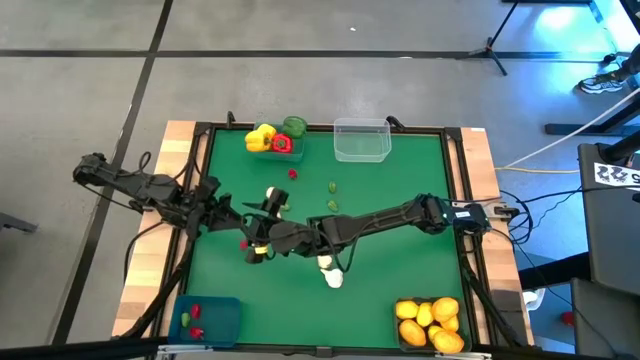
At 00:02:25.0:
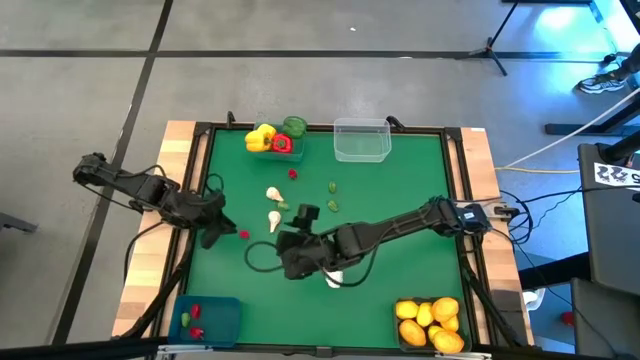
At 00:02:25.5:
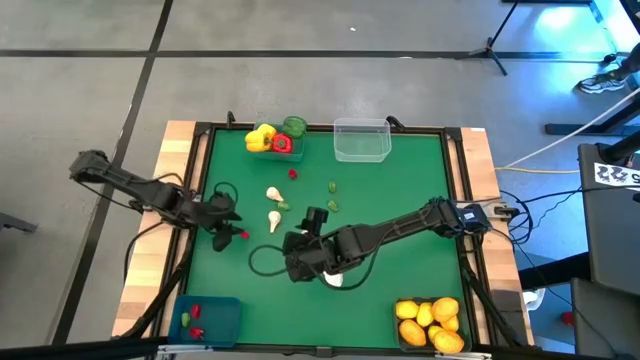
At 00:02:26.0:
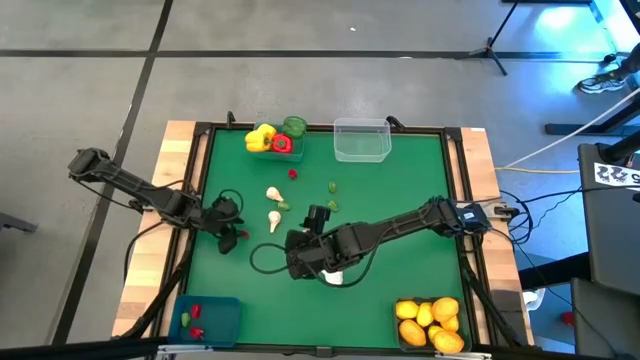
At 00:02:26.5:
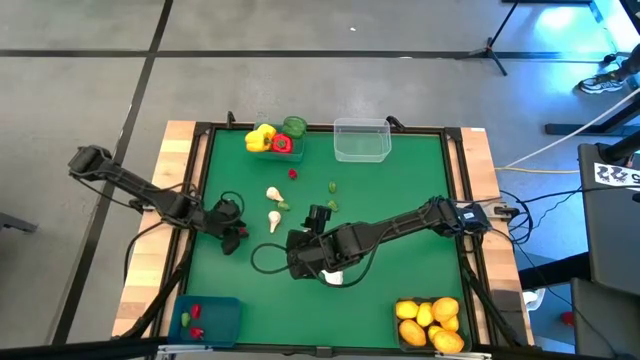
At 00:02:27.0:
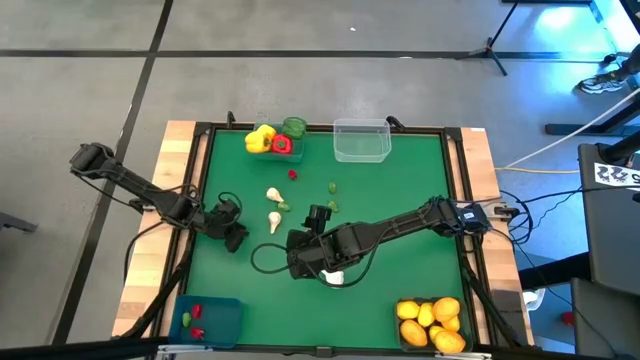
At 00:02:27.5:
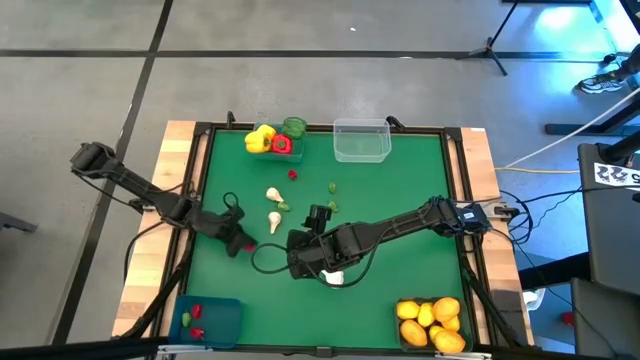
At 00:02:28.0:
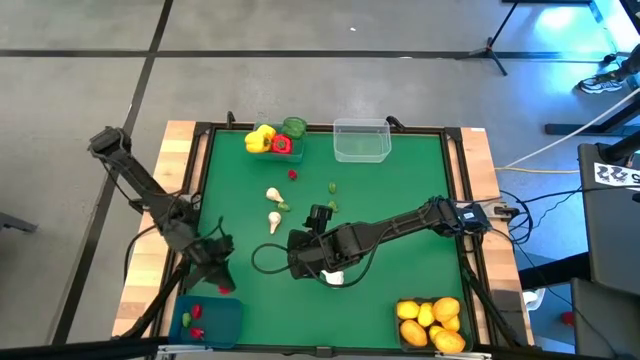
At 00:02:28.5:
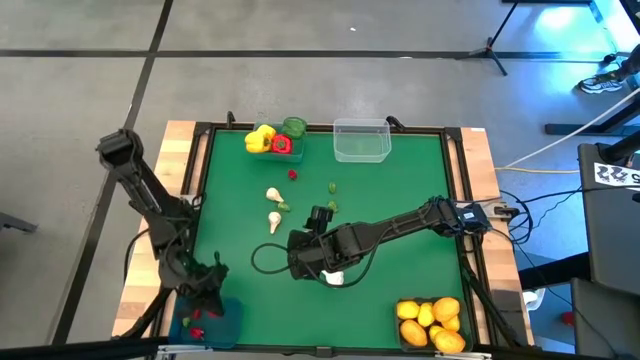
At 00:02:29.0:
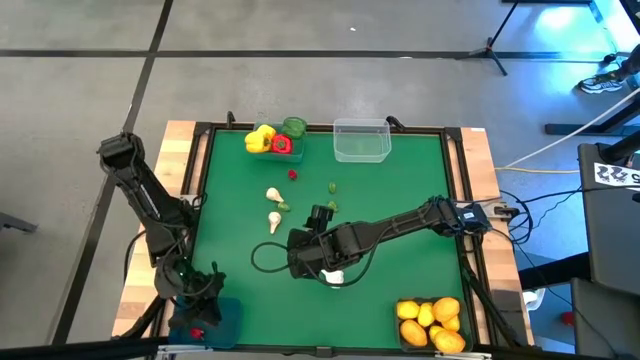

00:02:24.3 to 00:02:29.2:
Task: Sort produce into baskets
Put the red chili pepper into the blue bin

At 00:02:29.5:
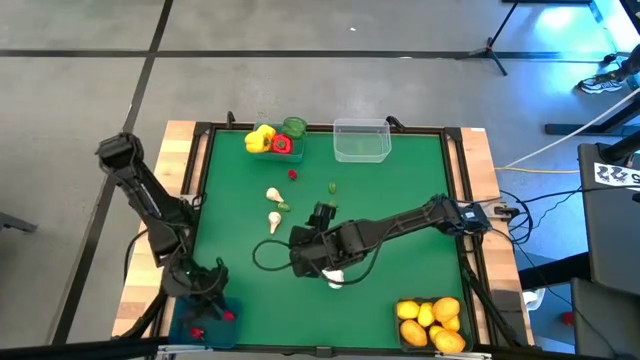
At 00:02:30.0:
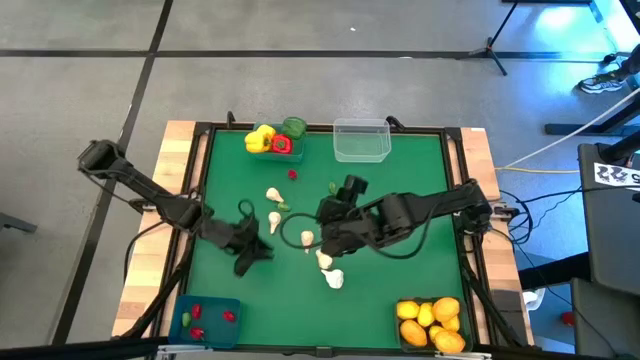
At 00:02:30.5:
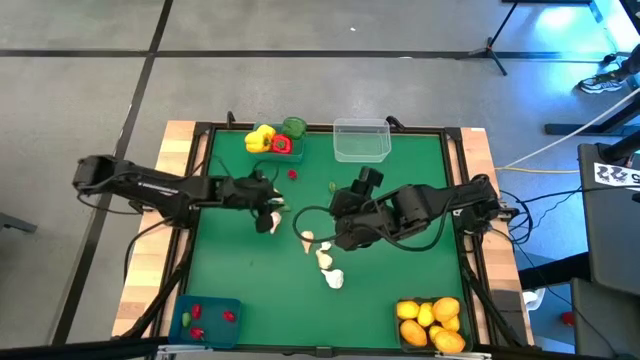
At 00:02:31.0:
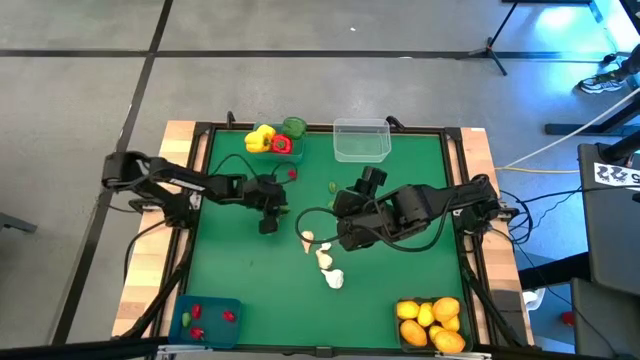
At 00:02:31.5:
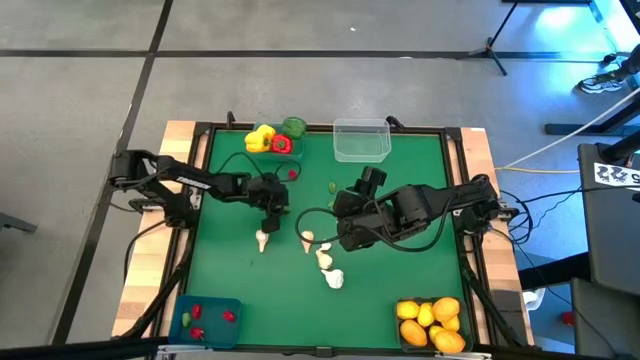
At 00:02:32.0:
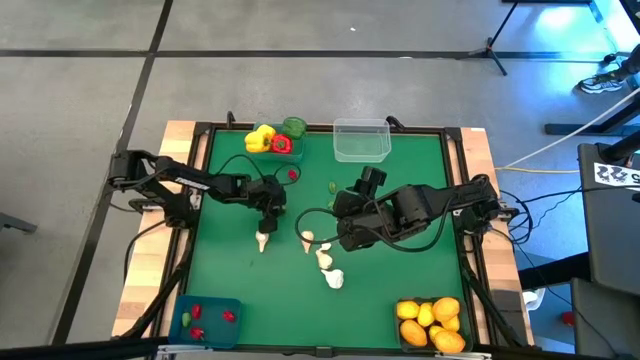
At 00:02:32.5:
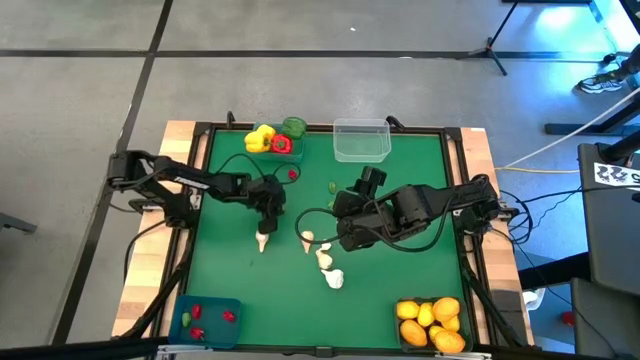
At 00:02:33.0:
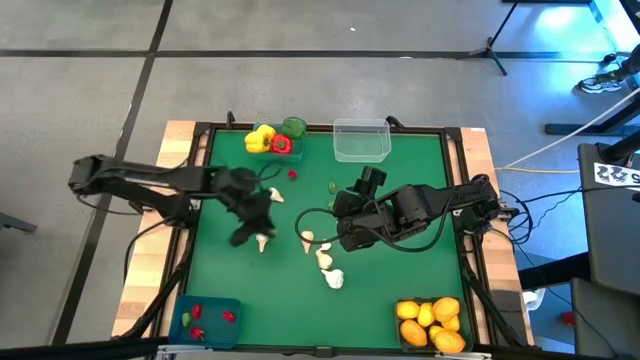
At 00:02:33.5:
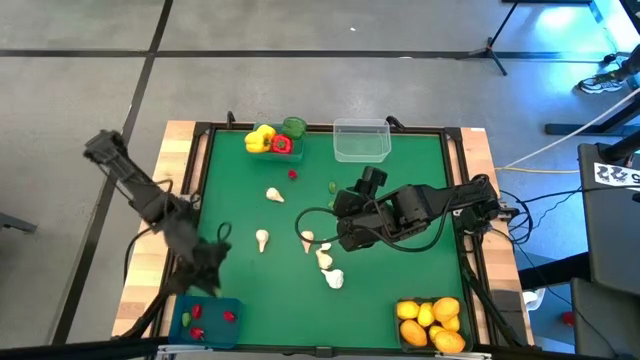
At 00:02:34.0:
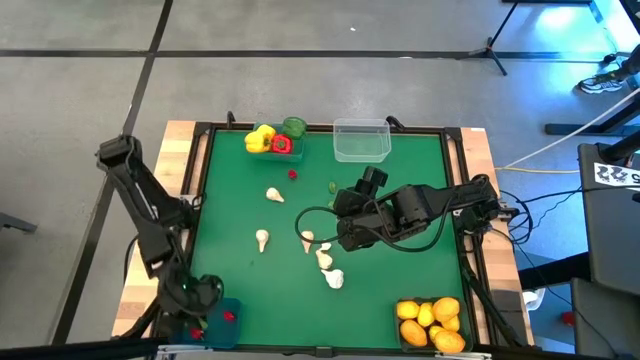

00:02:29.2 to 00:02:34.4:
Put the green chili pepper into the blue bin

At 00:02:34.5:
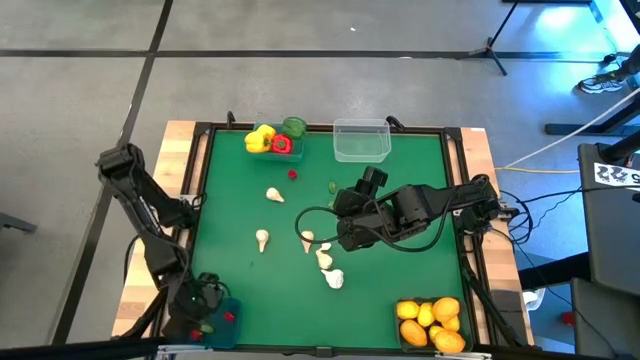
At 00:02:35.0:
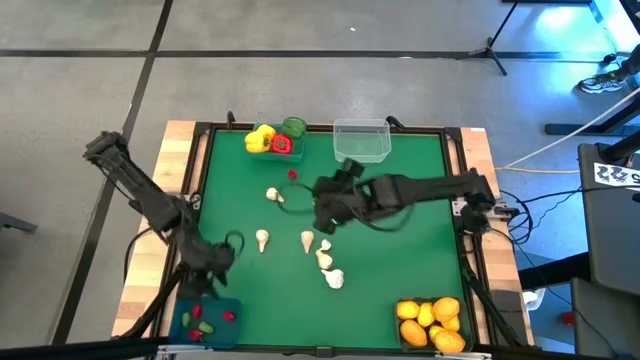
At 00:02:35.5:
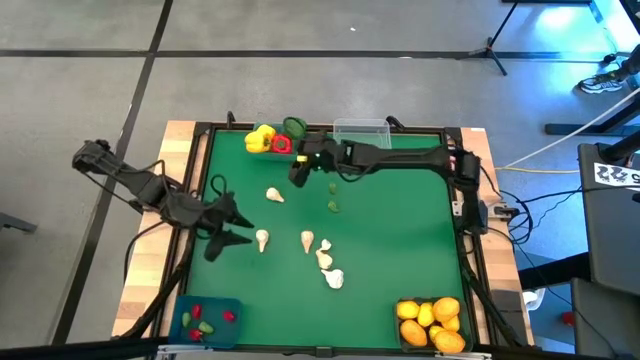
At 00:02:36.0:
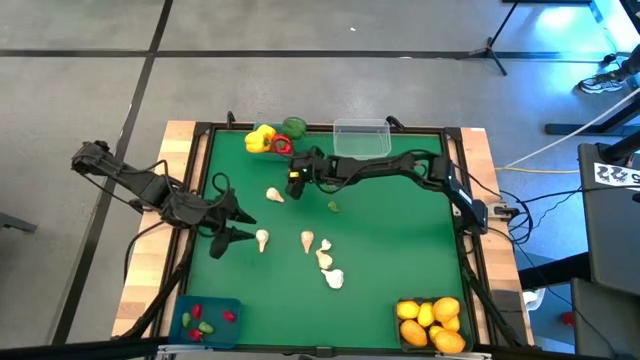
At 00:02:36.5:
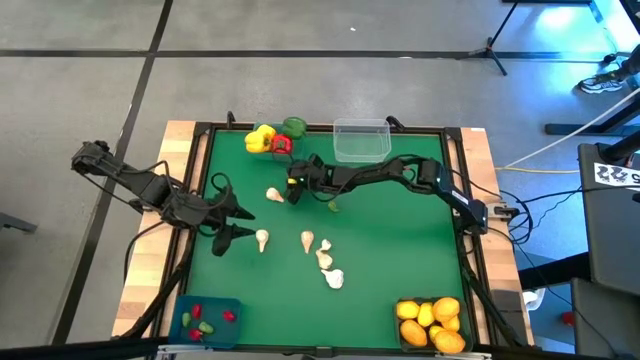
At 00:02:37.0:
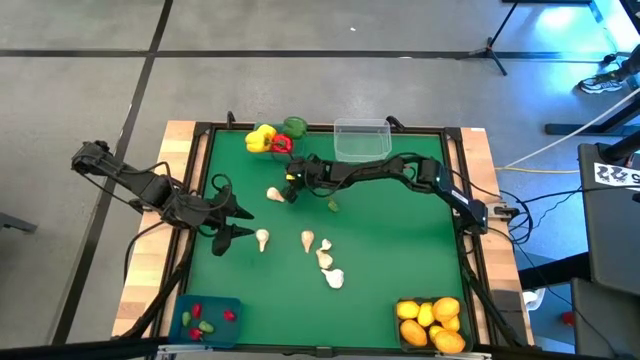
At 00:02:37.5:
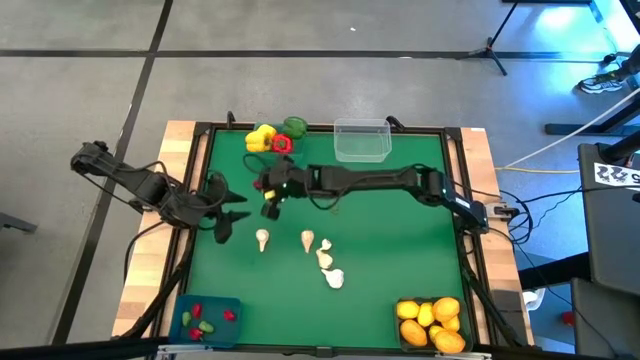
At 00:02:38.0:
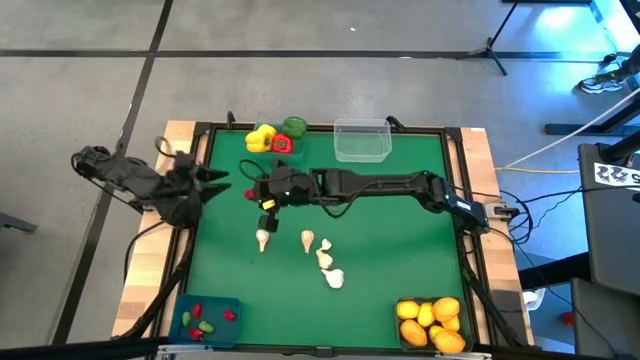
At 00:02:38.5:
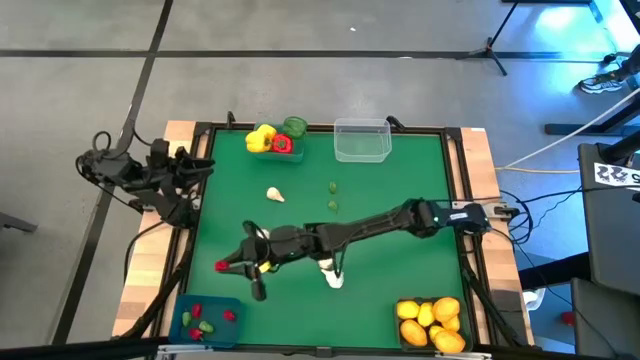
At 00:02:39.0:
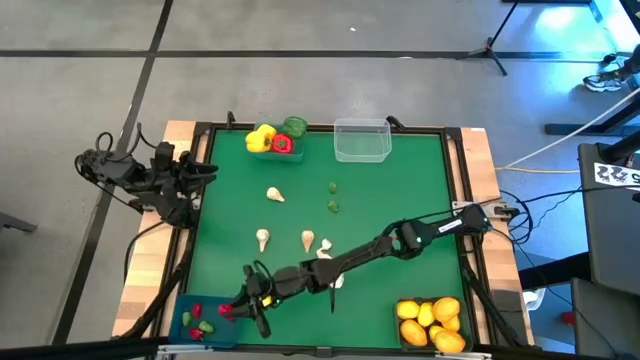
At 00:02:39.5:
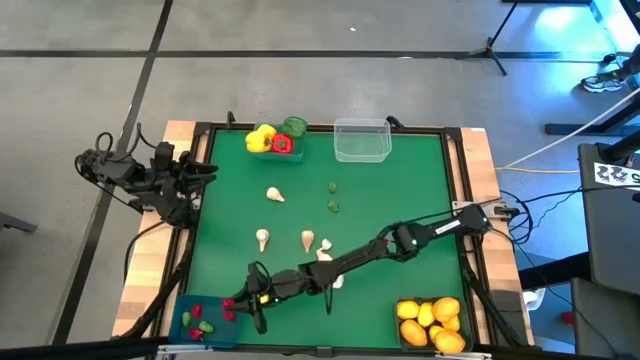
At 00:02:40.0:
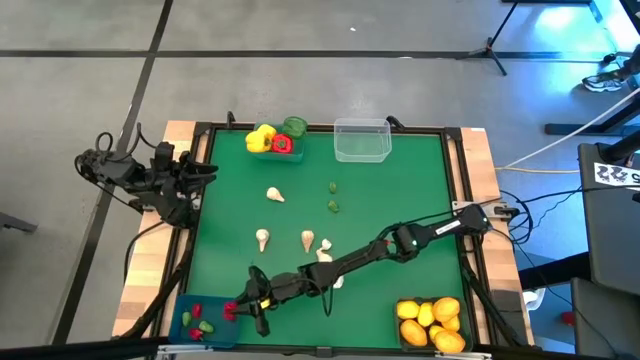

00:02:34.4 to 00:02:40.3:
Put the red chili into pepper into the blue bin

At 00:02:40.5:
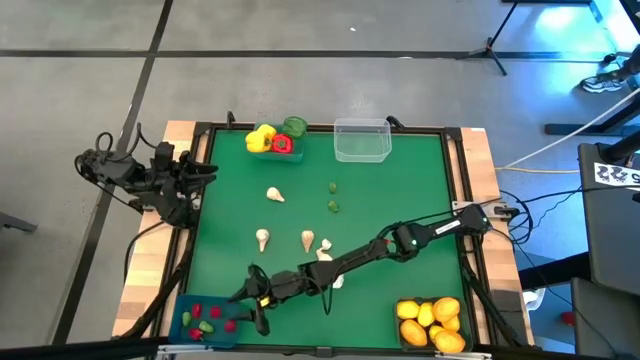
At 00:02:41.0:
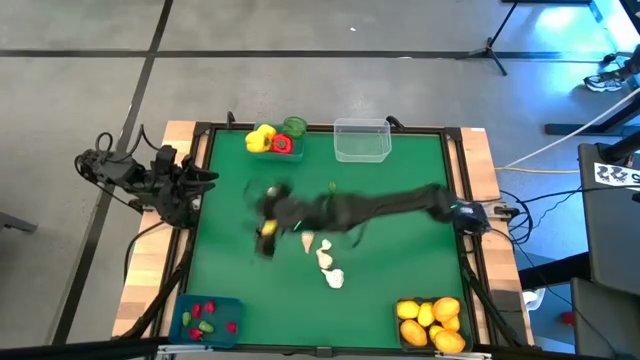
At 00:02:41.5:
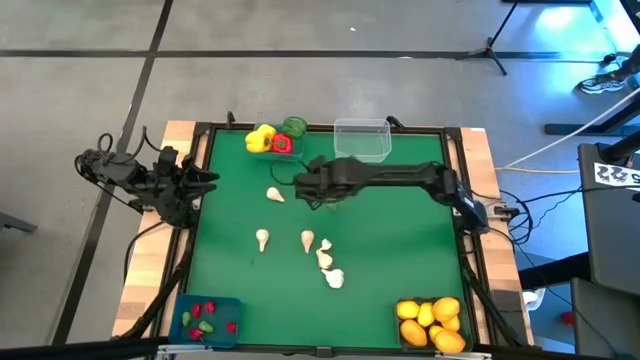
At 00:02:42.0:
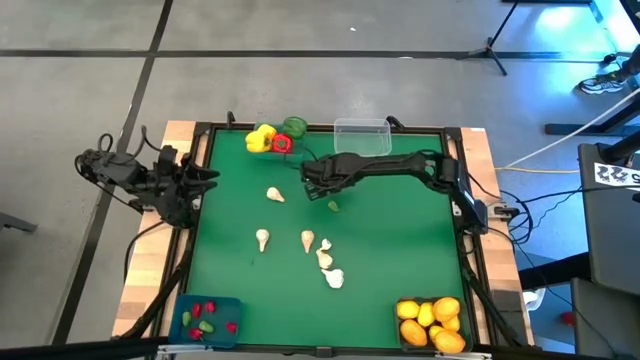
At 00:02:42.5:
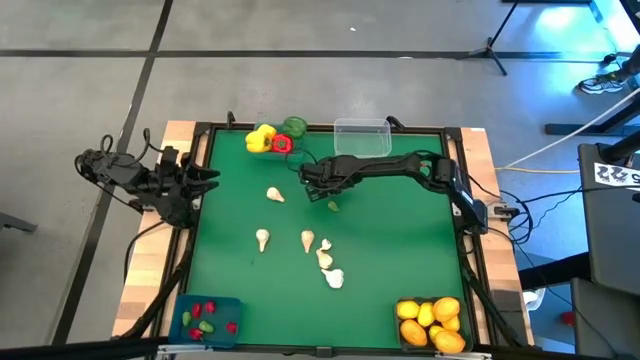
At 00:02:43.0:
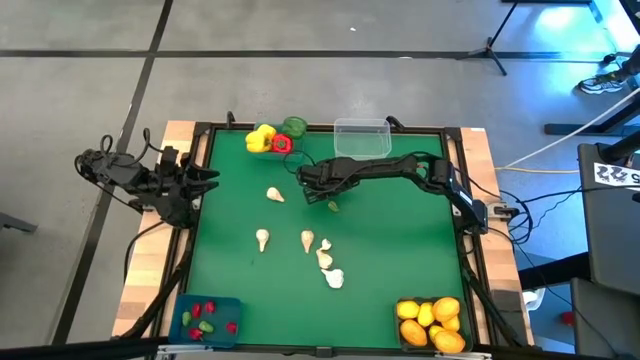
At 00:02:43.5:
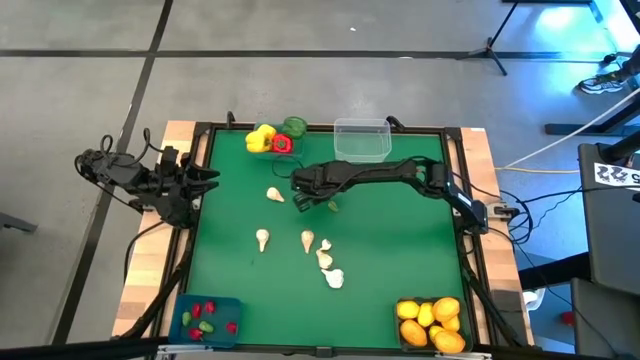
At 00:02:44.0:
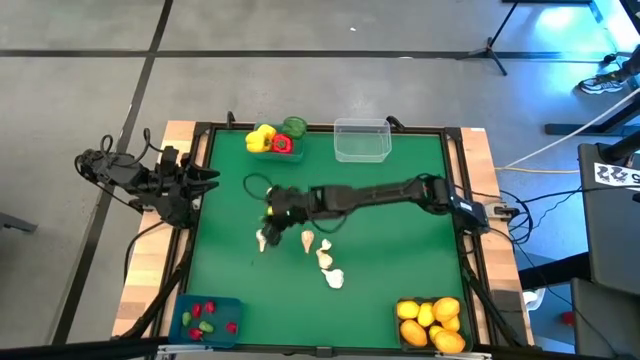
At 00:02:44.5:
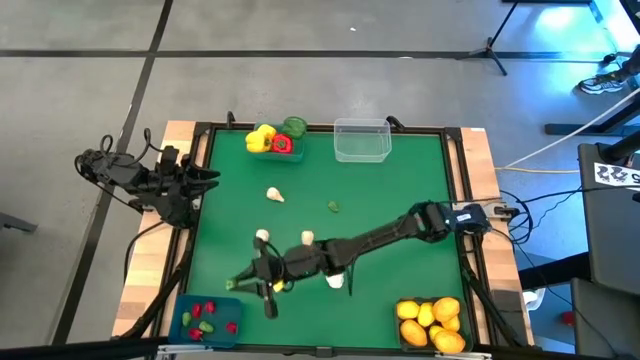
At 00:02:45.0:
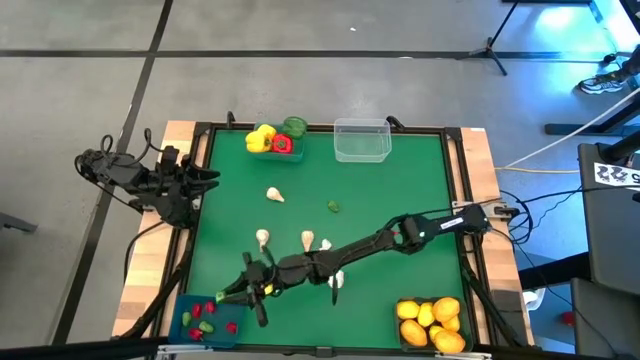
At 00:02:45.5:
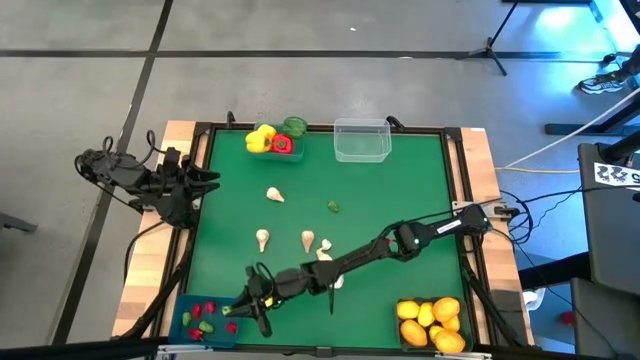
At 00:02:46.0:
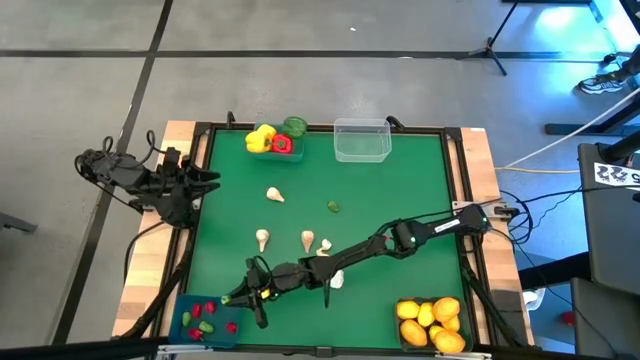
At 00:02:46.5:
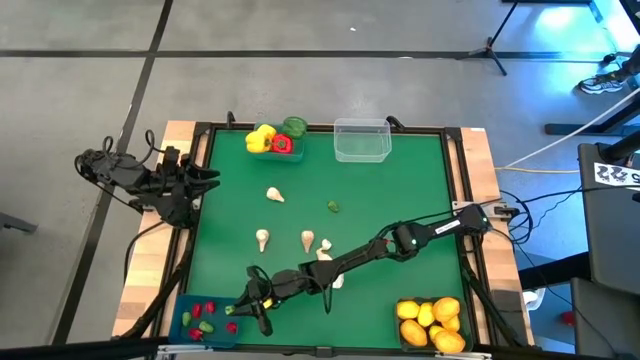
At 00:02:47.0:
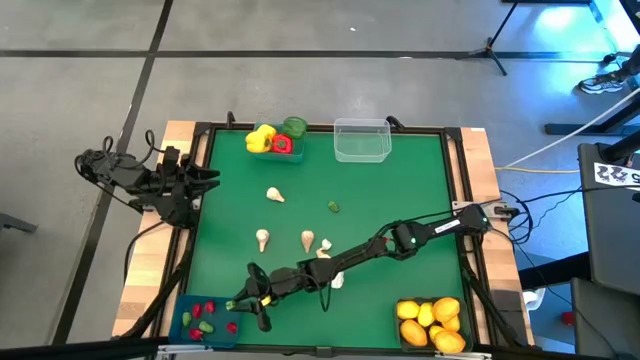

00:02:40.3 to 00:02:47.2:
Put the green chili pepper into the blue bin
